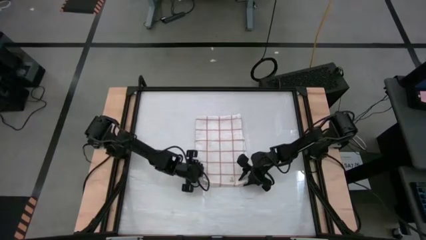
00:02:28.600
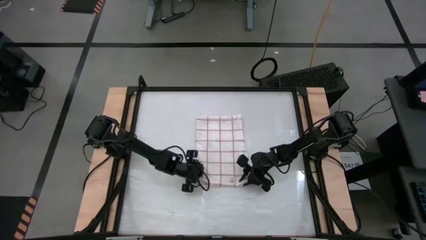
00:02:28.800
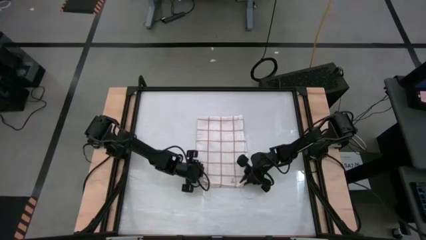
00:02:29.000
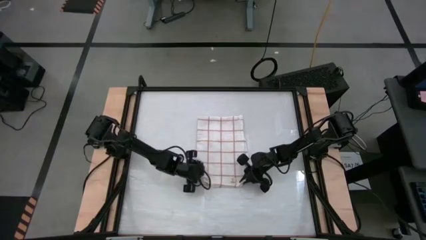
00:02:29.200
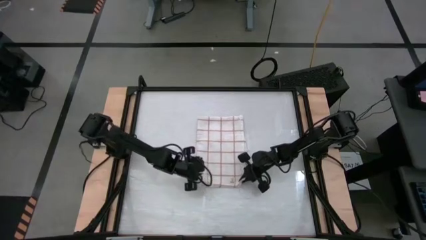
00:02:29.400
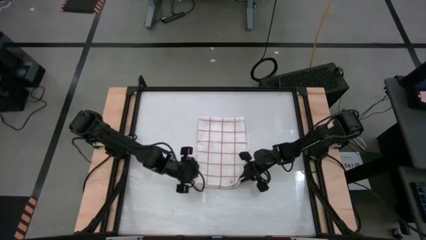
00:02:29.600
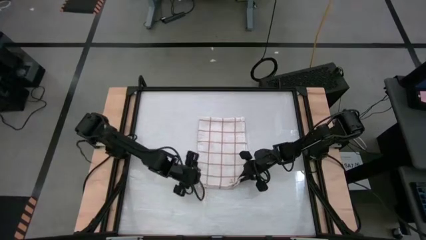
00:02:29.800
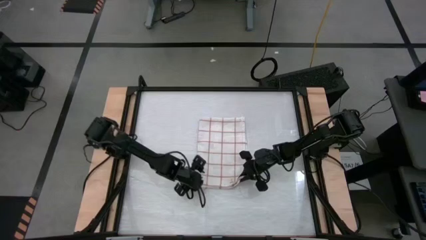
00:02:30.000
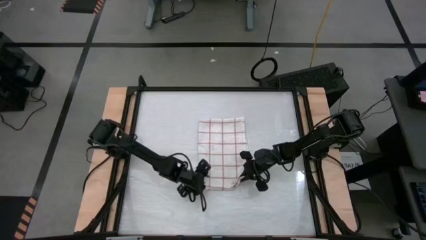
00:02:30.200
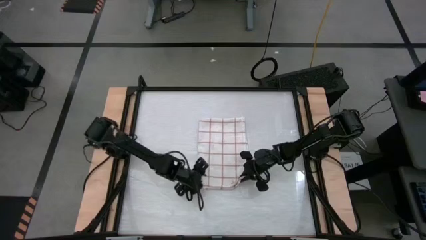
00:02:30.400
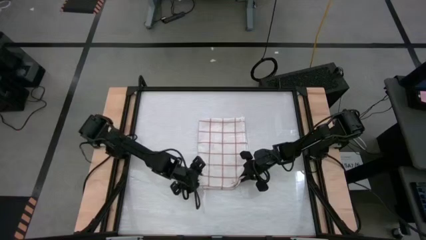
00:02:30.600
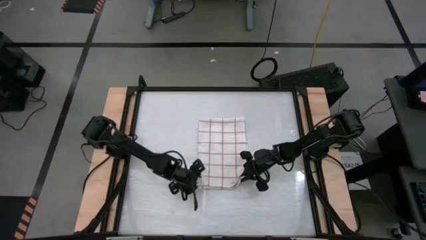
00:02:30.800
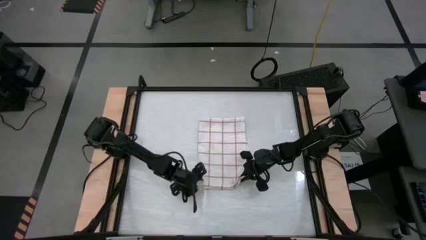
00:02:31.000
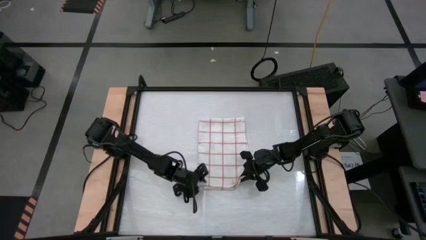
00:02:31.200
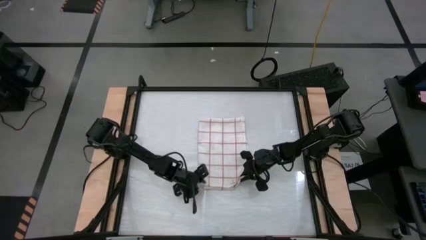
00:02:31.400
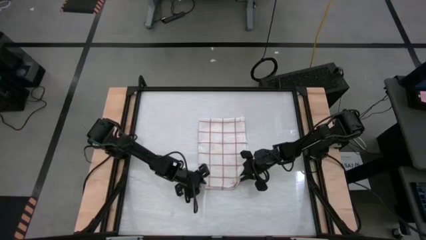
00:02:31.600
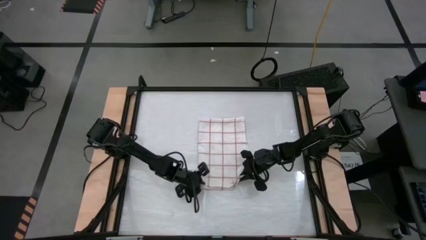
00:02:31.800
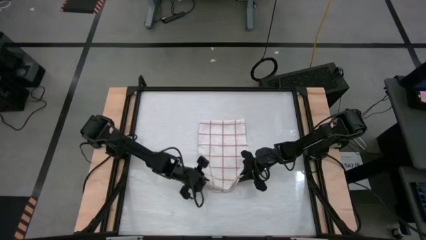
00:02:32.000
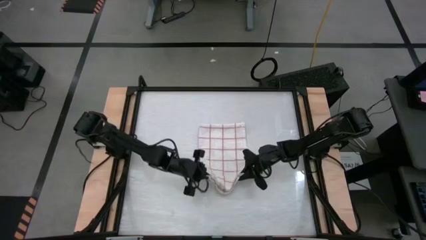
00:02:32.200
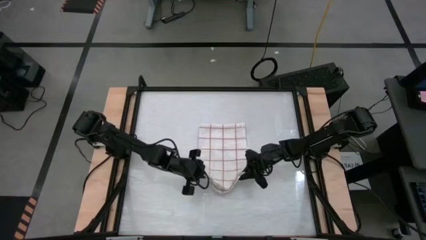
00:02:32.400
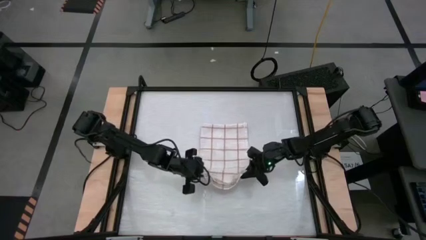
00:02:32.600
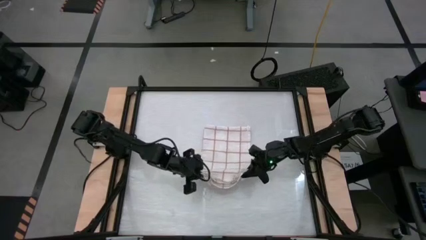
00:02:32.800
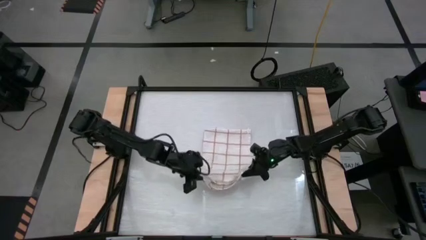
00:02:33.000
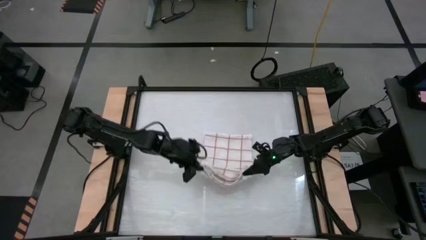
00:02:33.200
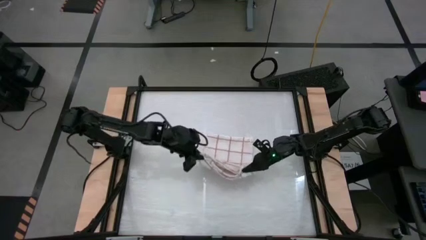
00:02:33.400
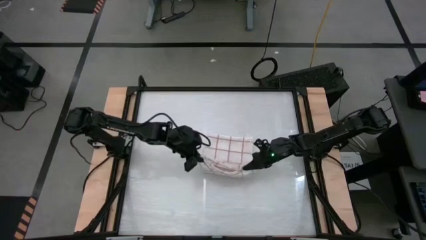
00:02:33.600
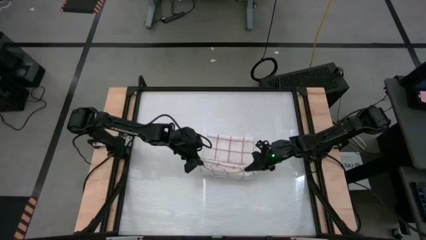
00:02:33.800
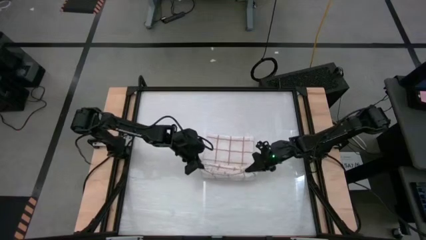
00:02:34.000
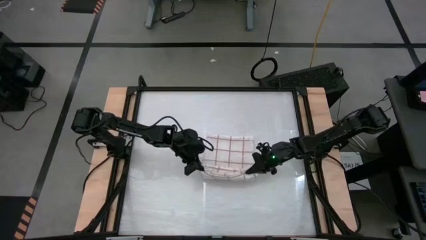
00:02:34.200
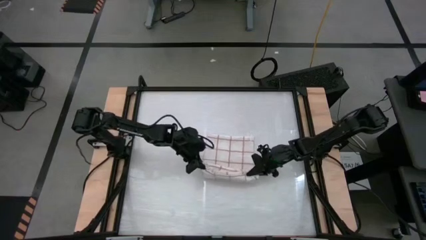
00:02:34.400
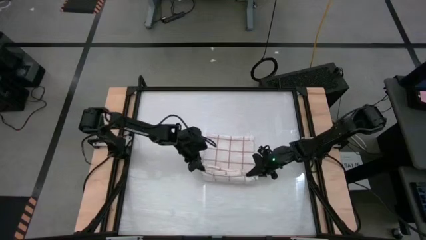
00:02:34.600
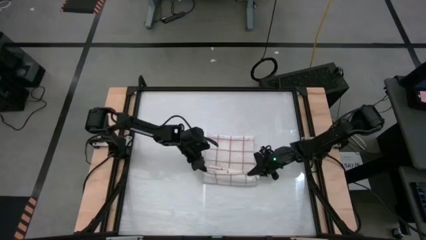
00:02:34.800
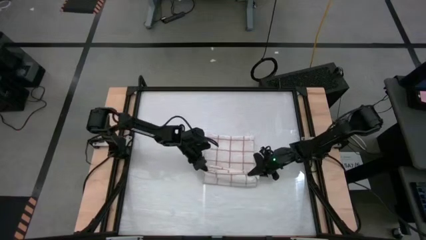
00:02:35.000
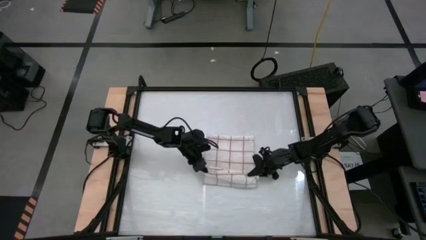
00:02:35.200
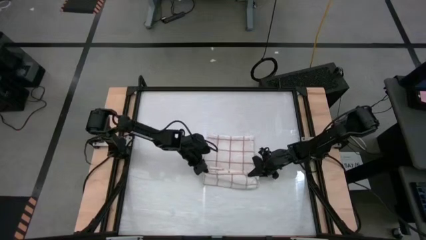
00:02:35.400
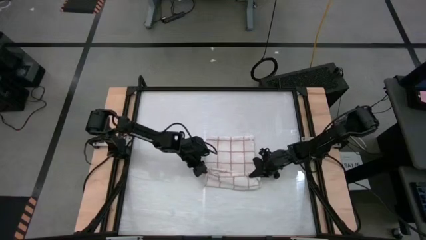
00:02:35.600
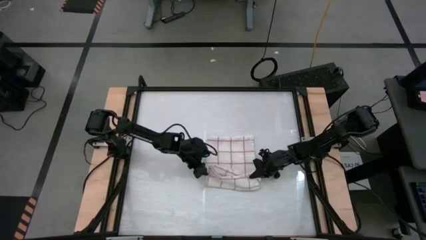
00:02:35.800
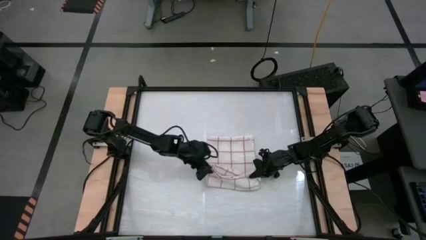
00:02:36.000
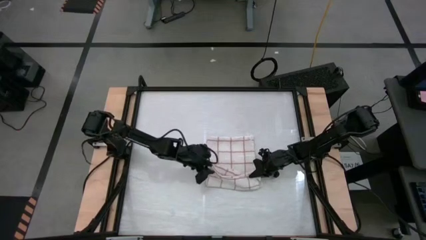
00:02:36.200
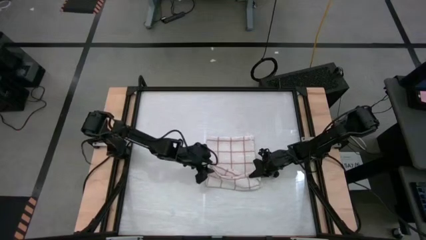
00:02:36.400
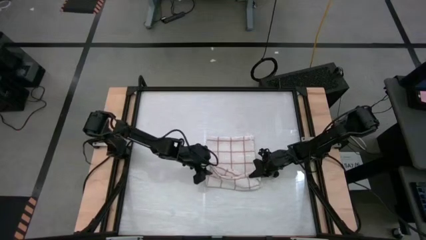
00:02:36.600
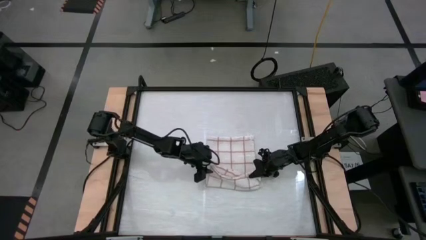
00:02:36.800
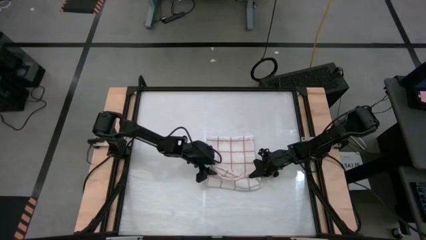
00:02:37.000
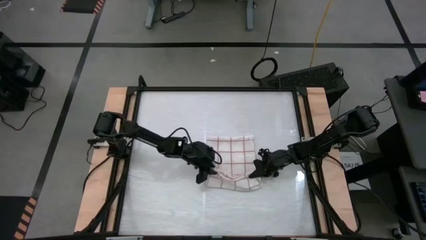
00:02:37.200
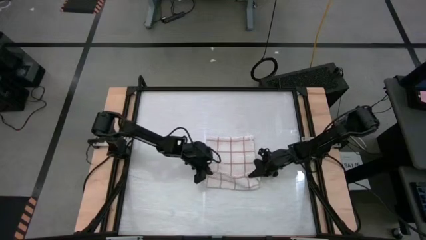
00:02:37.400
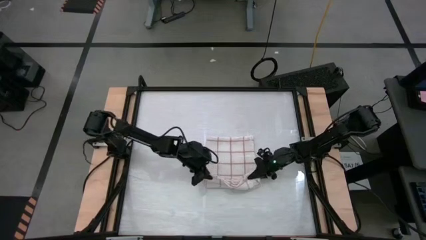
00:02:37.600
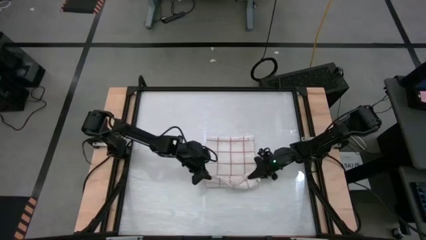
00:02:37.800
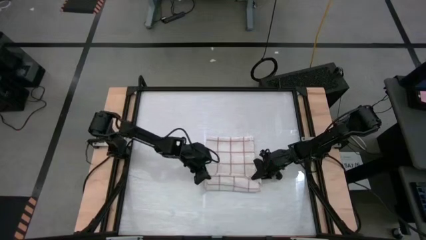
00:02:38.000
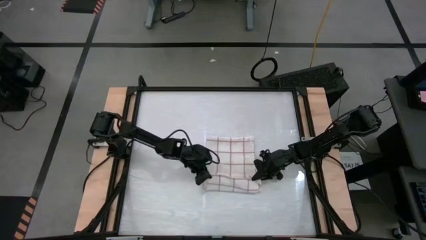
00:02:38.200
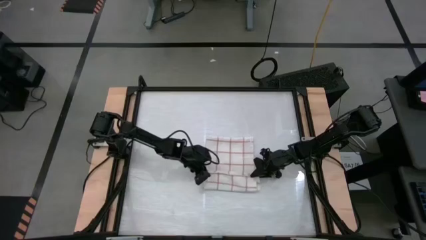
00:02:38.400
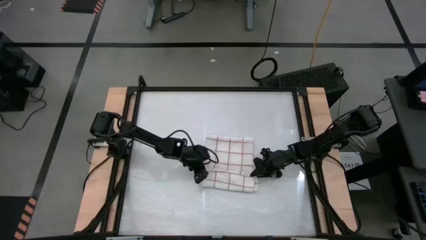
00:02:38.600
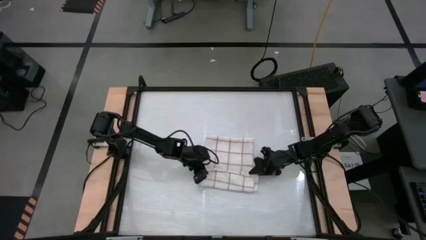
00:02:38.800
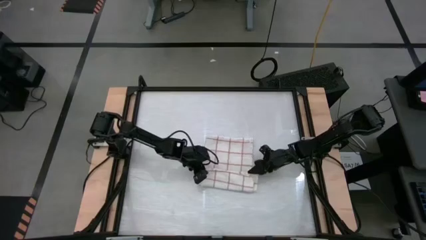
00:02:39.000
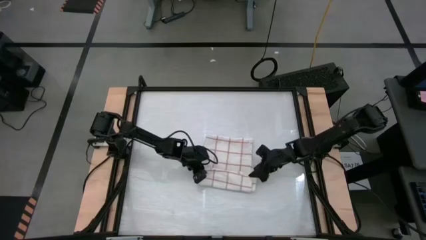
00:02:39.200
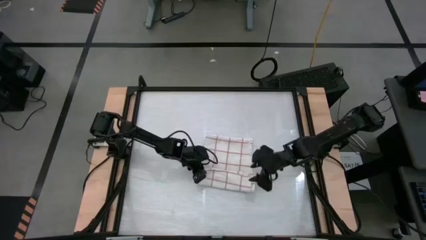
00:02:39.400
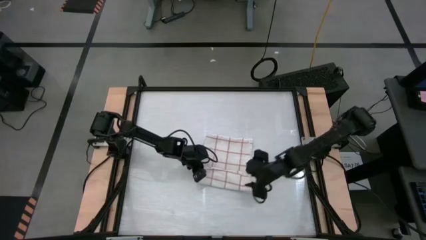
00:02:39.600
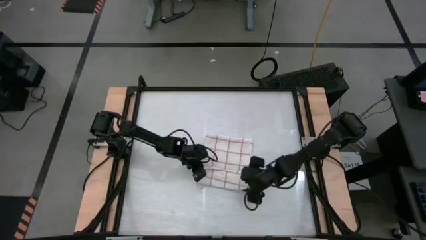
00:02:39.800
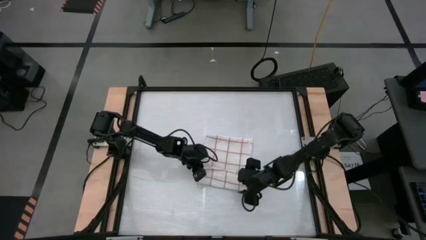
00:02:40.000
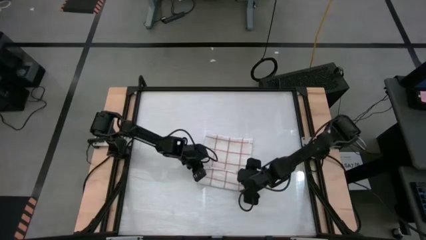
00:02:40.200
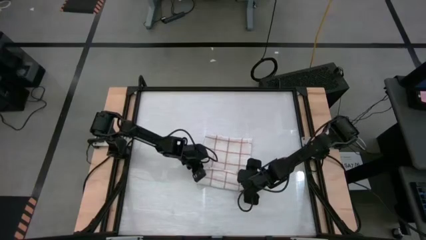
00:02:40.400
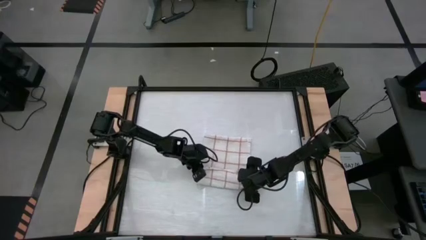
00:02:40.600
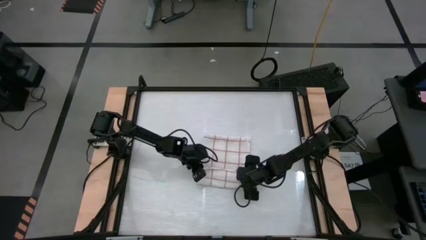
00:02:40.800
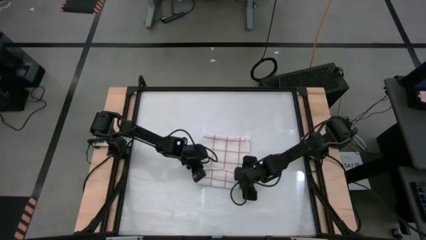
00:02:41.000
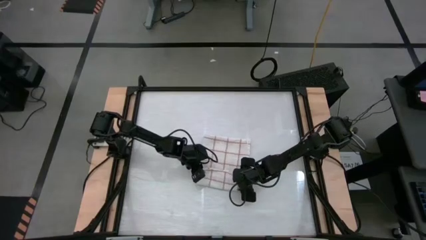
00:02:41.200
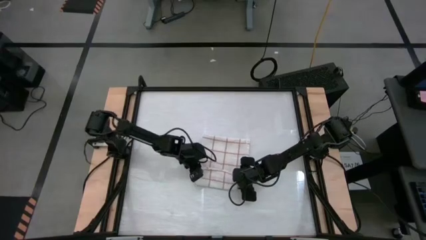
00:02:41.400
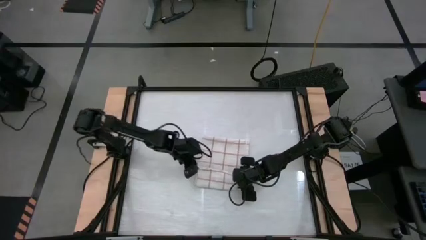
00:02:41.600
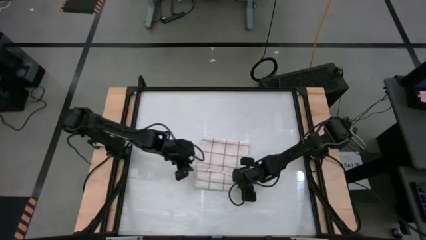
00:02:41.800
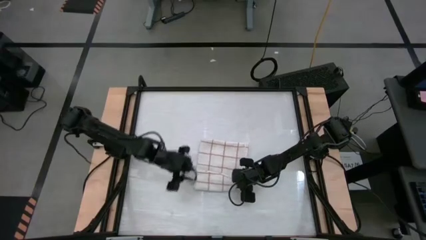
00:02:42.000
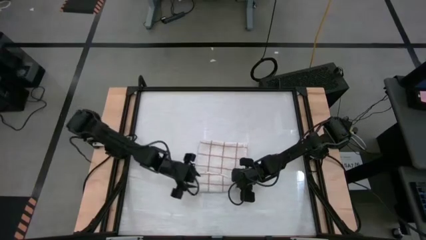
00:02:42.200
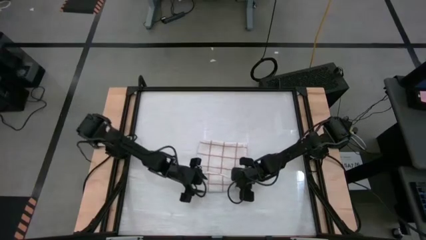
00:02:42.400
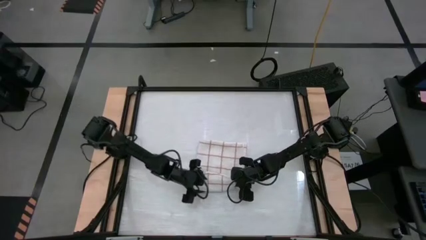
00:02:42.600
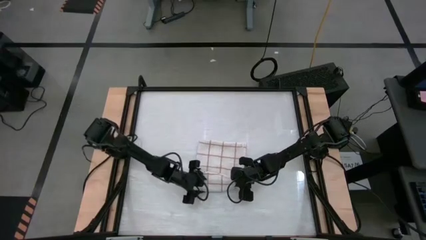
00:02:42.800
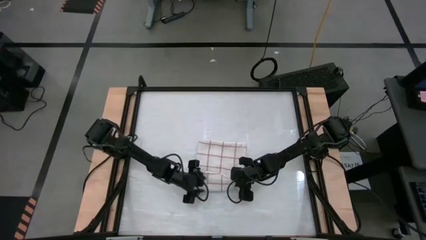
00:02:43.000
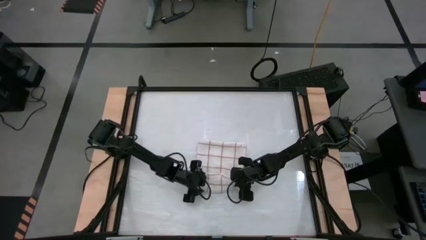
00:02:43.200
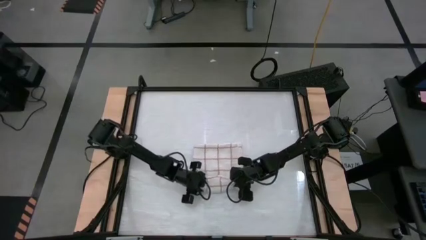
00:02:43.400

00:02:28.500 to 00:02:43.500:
Task: Roll towel
Roll the white checkered towel
